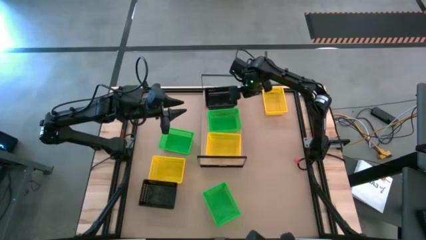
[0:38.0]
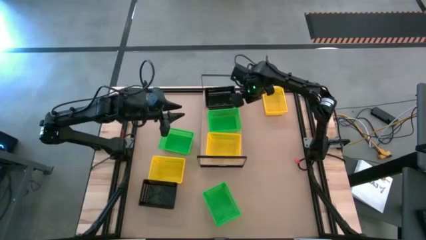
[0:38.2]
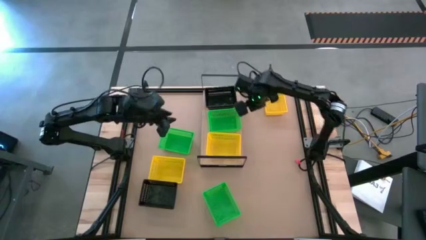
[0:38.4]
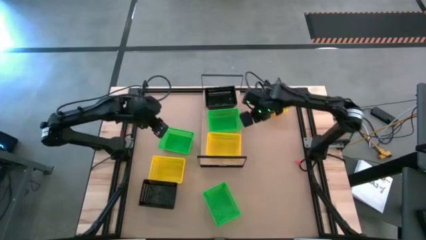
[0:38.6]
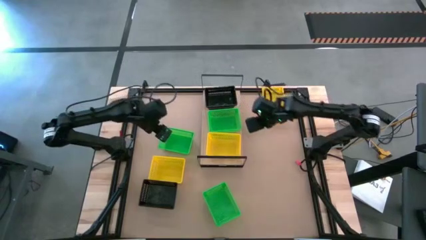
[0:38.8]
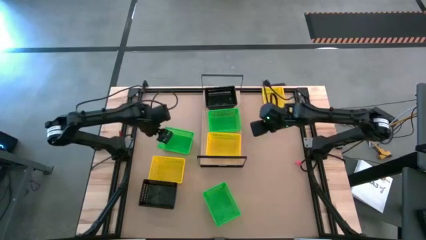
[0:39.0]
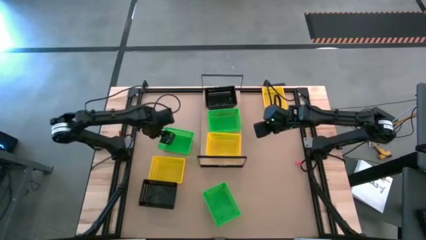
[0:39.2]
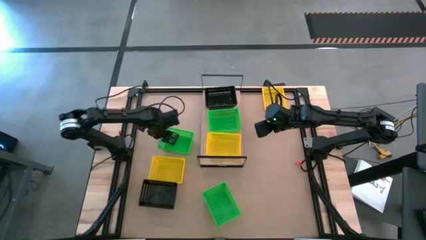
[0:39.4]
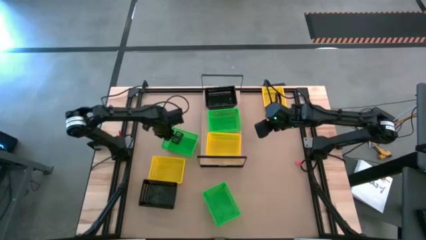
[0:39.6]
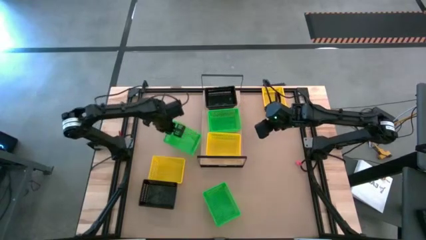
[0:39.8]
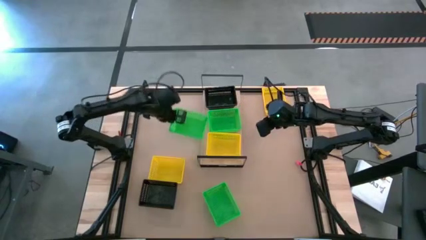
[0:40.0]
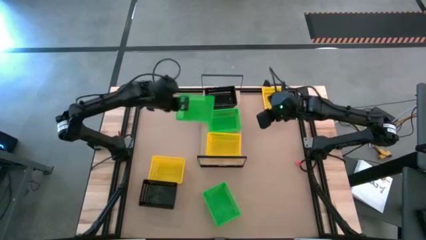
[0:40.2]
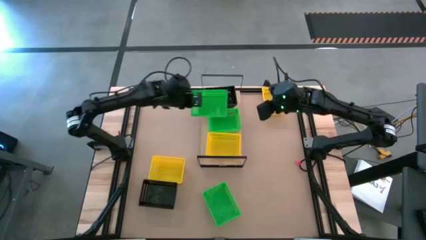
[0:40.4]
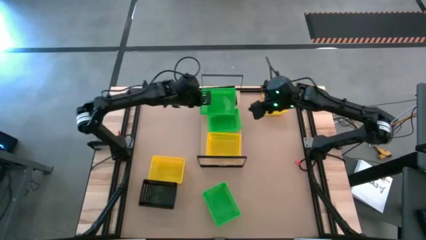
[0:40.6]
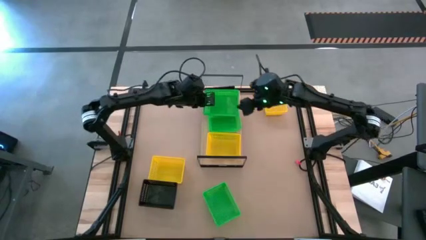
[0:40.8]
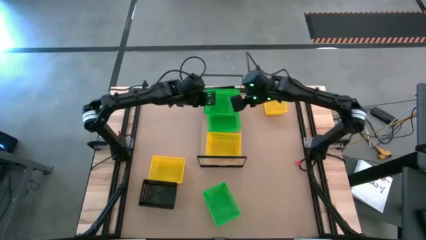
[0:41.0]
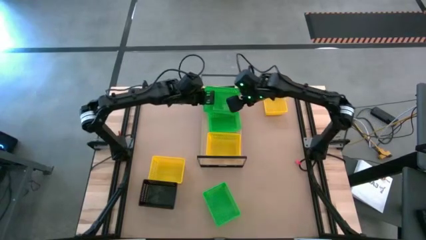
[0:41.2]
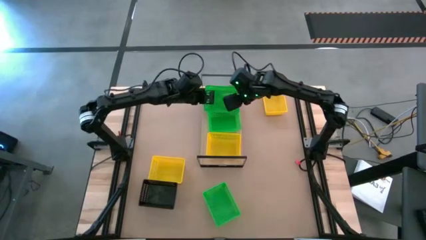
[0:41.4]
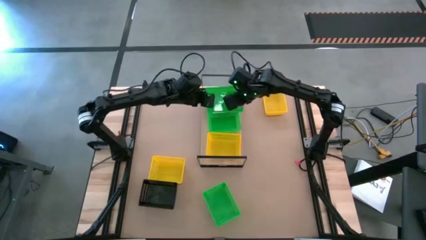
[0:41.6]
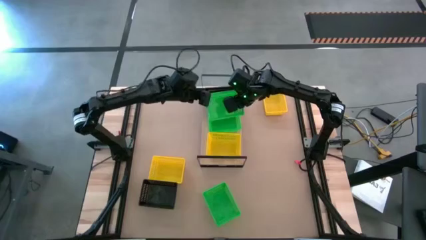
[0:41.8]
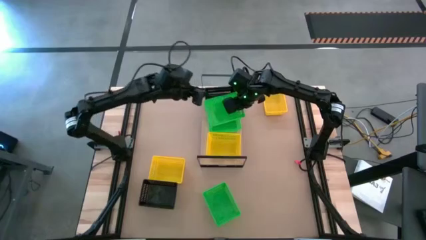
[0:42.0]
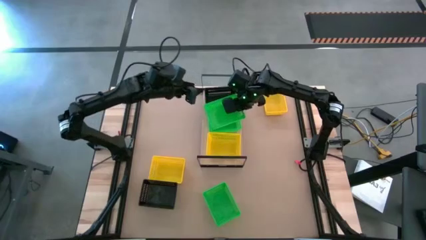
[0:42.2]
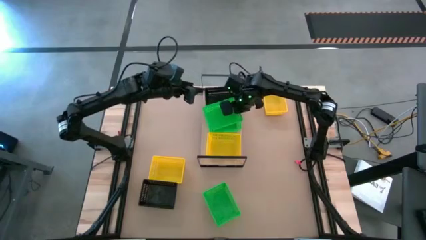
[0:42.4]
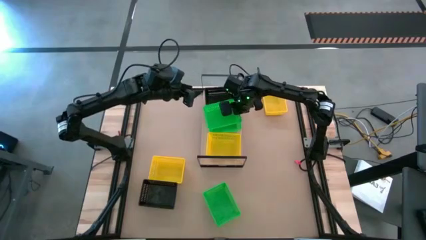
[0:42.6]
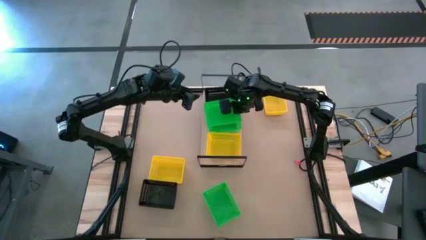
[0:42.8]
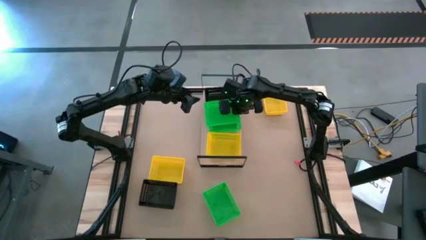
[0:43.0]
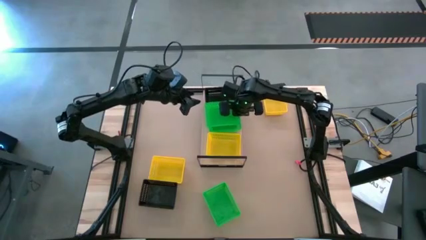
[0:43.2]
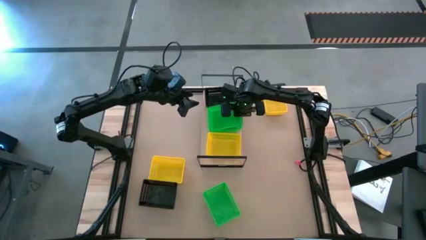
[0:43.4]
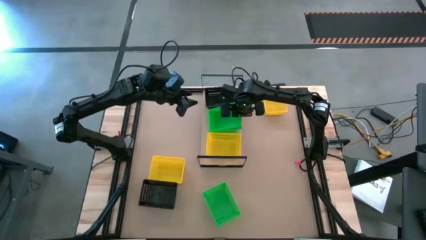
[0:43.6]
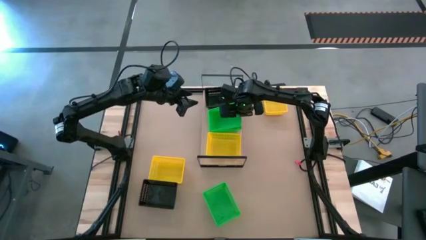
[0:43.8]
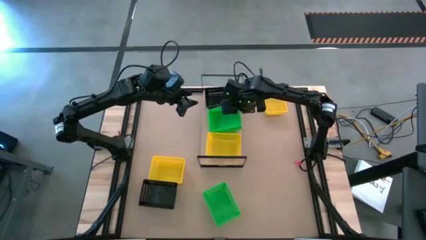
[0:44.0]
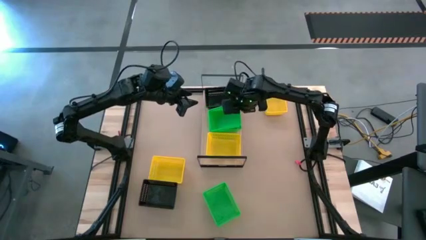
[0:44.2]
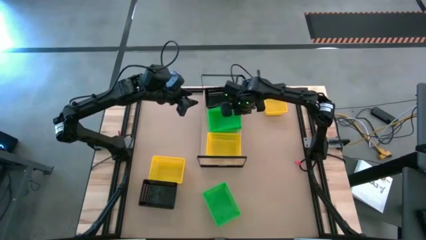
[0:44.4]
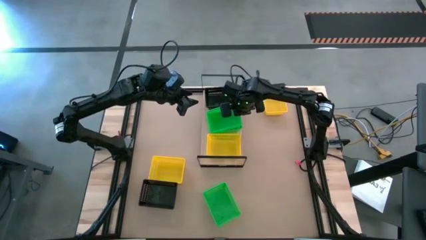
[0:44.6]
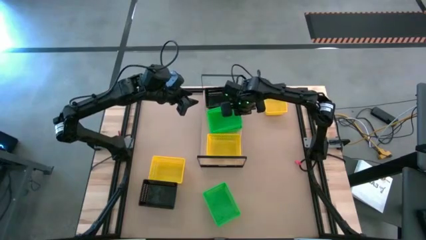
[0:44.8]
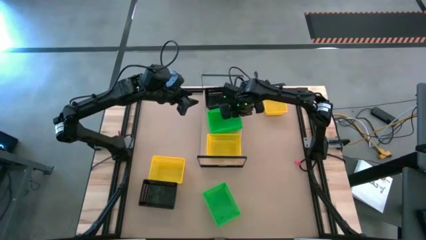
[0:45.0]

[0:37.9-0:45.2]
Task: Stack baskets on shelf by color
Stack the top green bin on top of the green bin on the shelf

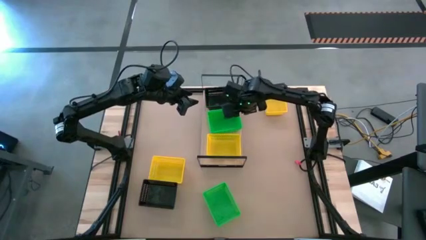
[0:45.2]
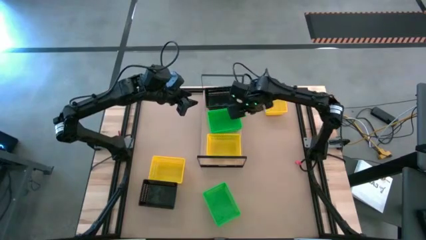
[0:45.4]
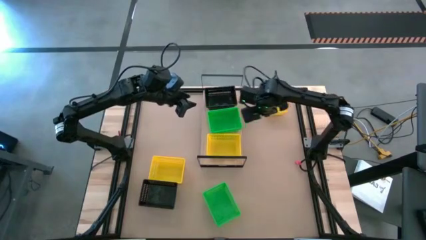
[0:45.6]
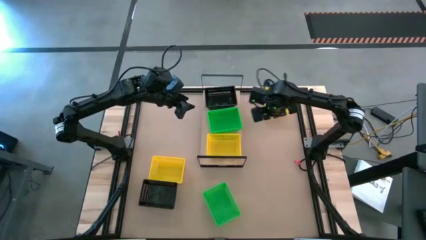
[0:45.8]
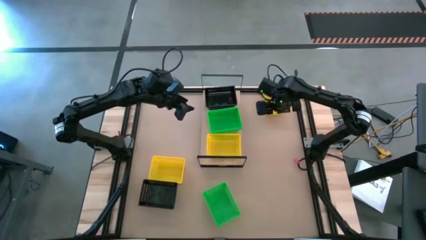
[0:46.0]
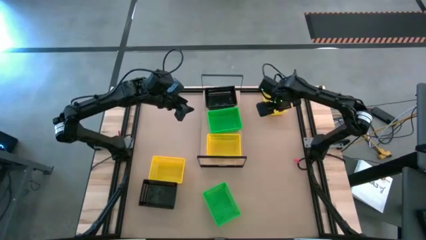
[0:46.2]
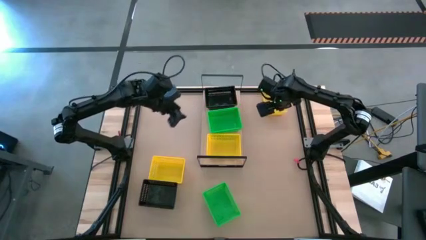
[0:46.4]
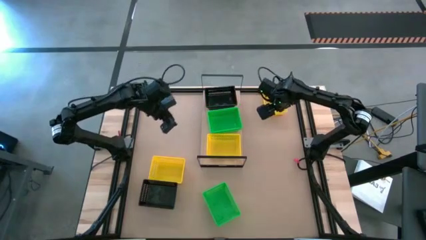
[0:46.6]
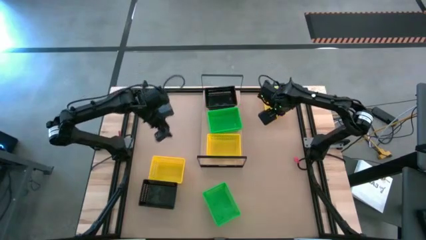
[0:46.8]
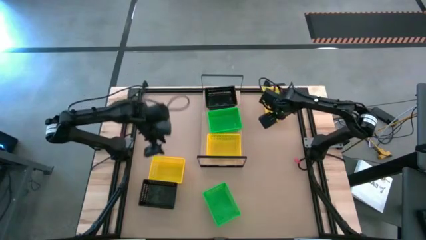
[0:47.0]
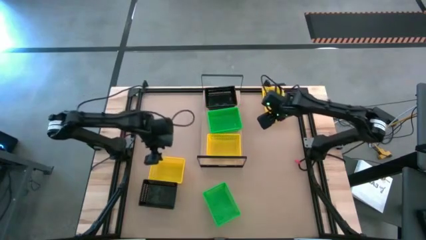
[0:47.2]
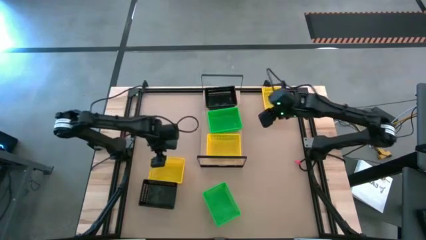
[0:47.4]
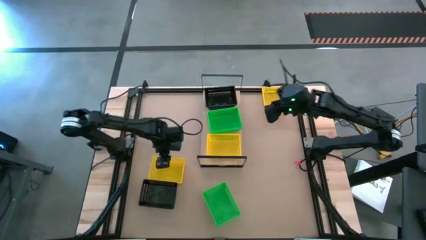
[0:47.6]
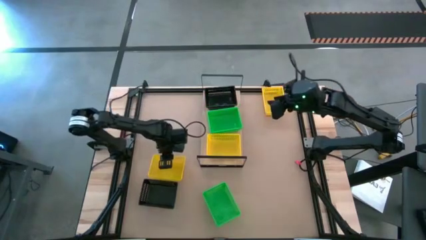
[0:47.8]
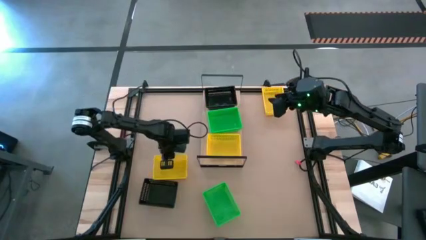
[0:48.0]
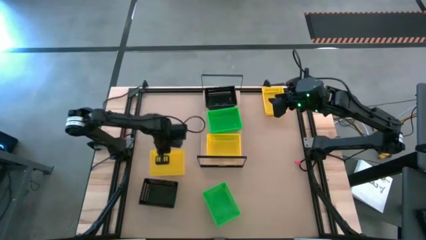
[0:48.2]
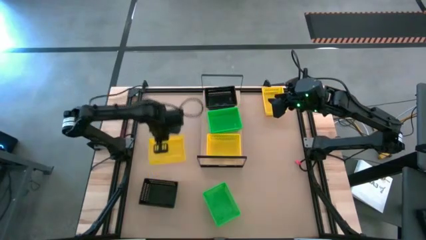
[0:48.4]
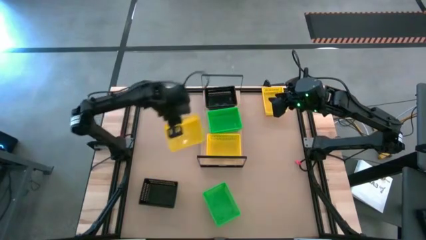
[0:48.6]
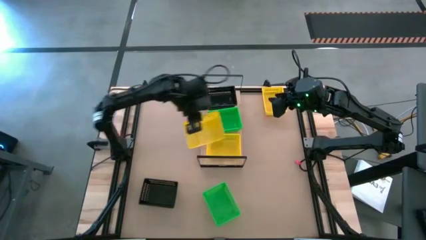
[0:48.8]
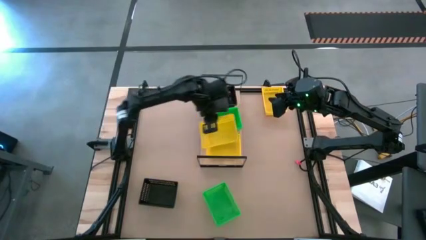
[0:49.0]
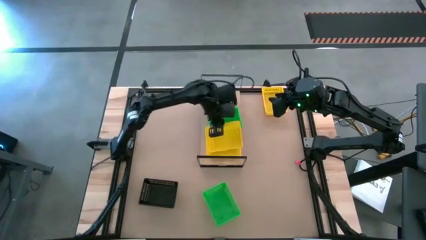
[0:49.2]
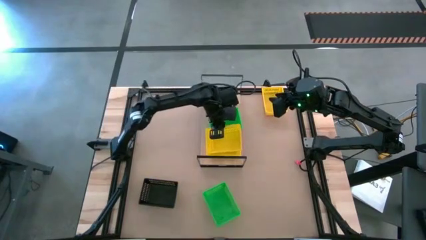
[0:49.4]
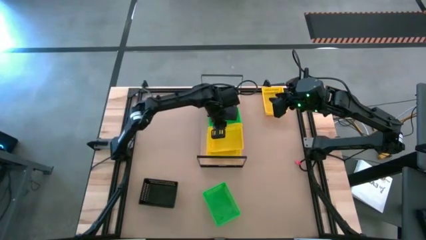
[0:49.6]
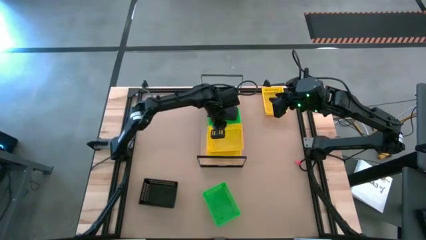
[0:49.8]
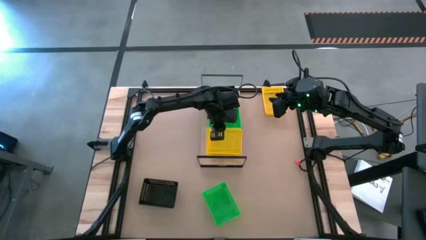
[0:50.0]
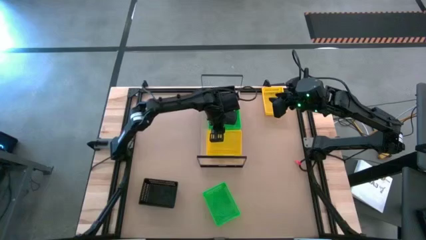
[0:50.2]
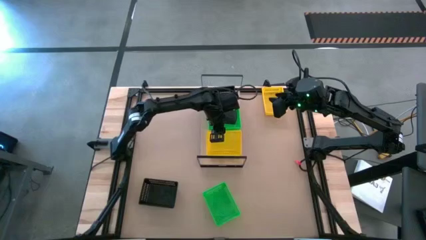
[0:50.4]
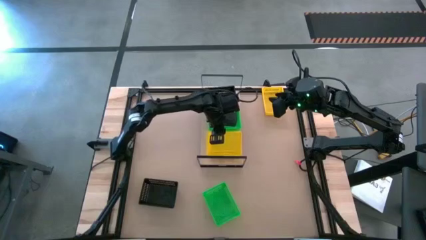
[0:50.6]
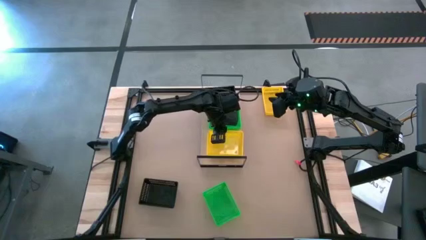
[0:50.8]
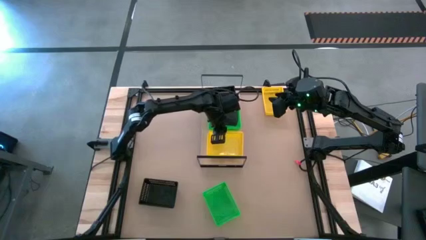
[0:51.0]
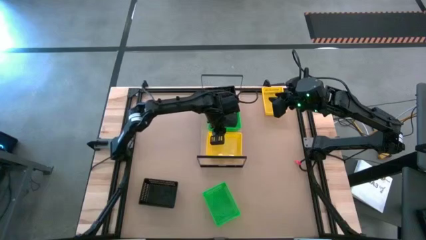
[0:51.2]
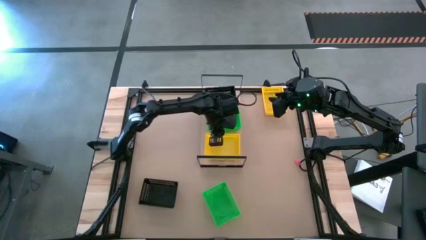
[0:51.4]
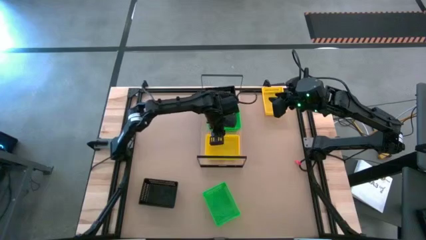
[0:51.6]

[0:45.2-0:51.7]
Stack the bottom yellow bin on top of the yellow bin on the shelf
